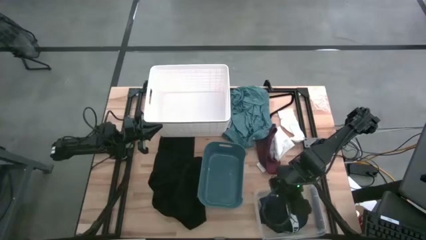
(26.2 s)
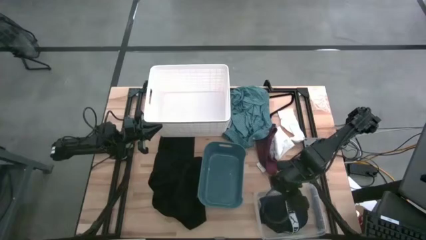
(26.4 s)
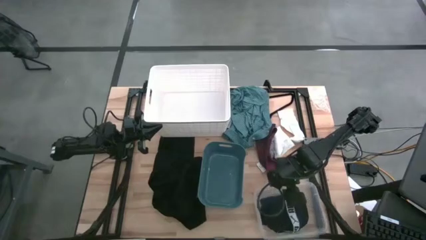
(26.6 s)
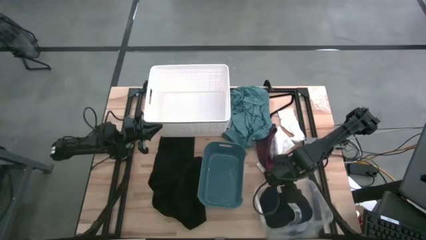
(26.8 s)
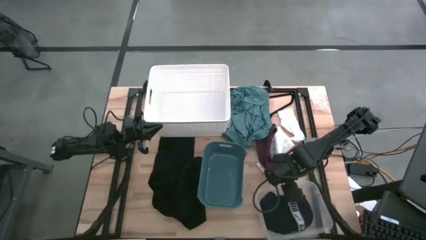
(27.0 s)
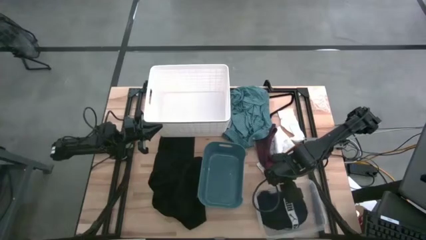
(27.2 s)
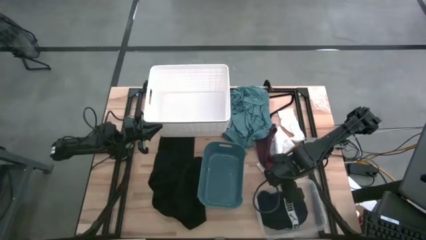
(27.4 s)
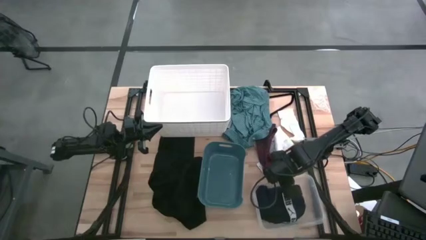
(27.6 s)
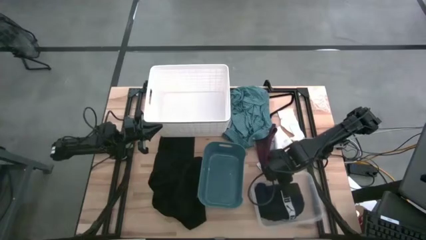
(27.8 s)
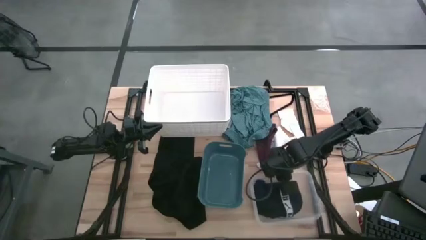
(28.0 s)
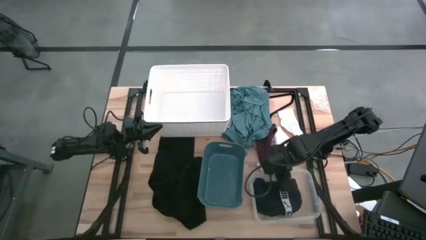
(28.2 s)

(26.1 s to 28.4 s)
Task: Pick & Place Cloths
Adjust the transparent bin

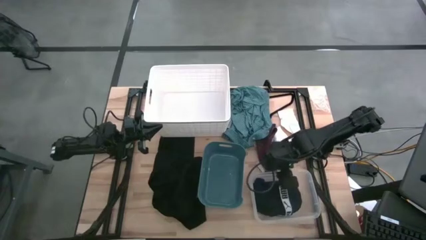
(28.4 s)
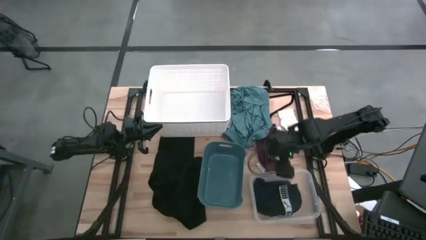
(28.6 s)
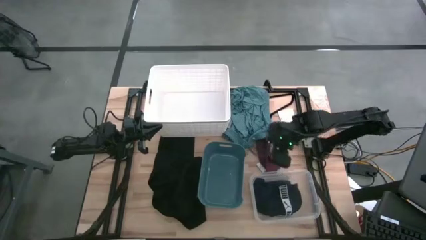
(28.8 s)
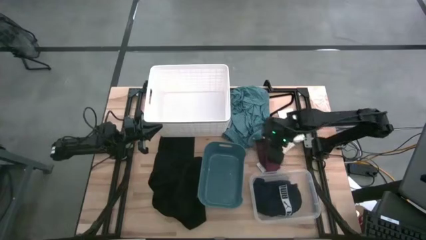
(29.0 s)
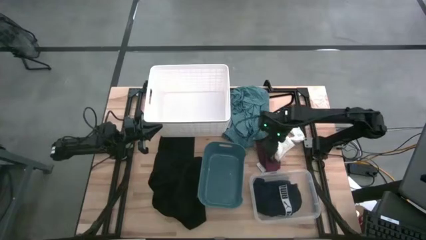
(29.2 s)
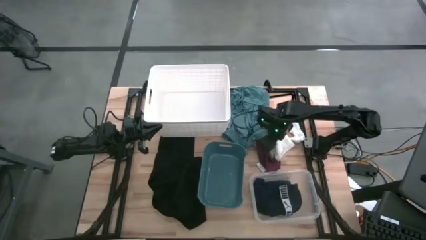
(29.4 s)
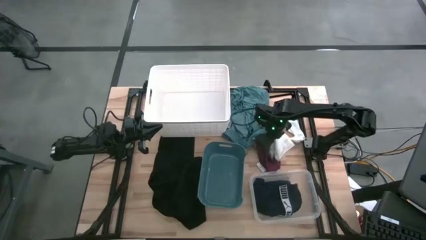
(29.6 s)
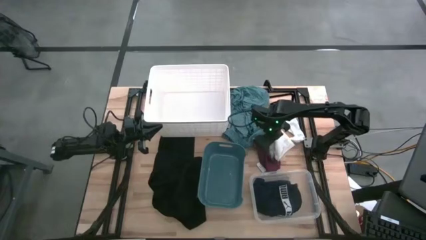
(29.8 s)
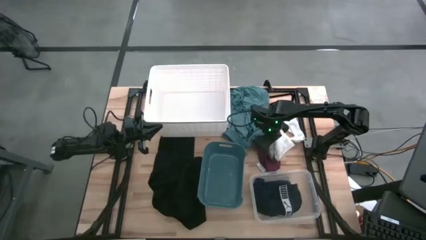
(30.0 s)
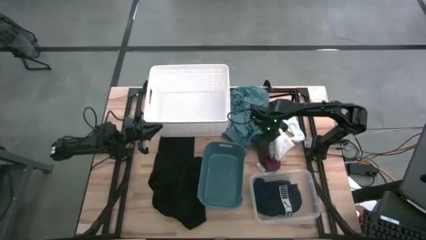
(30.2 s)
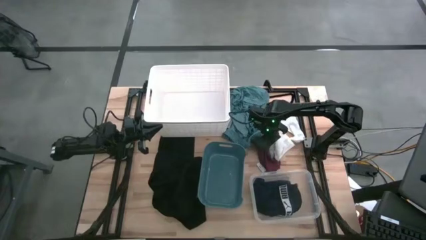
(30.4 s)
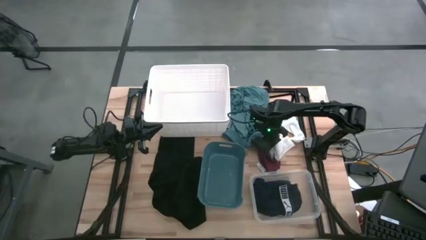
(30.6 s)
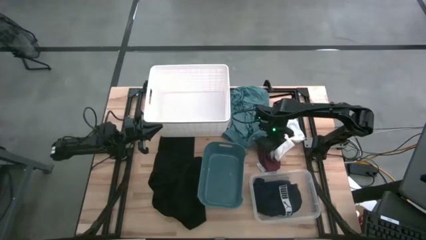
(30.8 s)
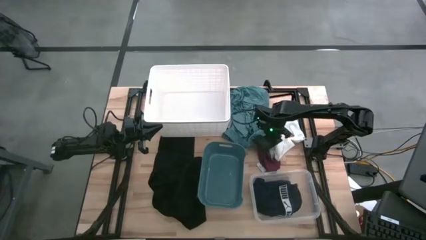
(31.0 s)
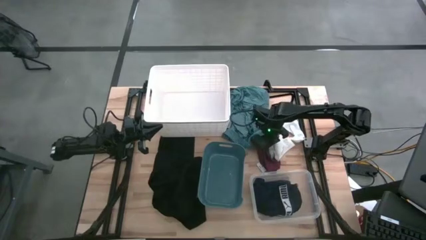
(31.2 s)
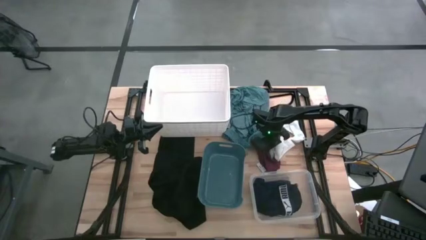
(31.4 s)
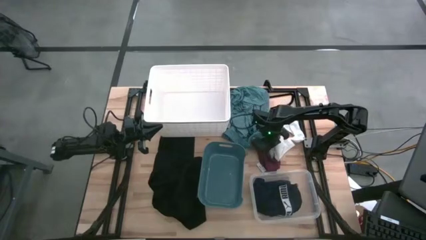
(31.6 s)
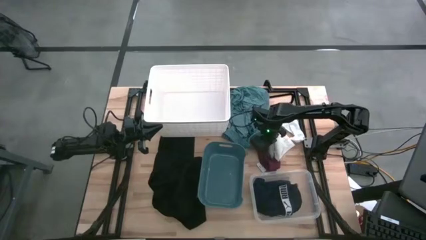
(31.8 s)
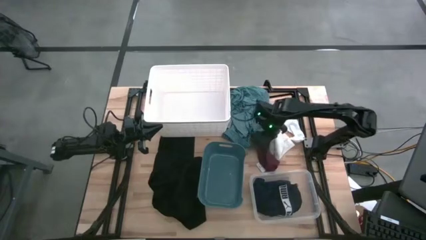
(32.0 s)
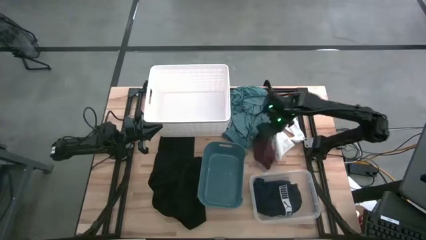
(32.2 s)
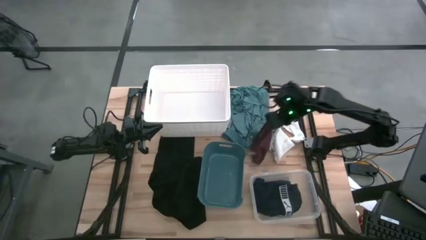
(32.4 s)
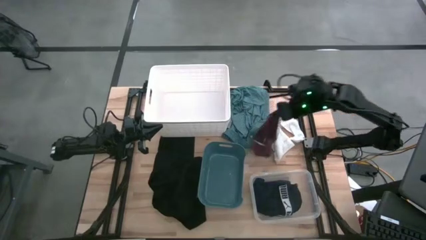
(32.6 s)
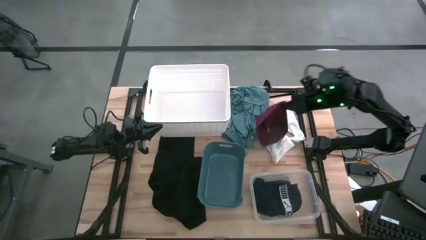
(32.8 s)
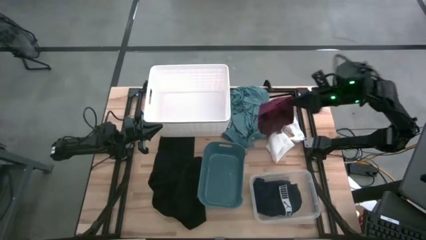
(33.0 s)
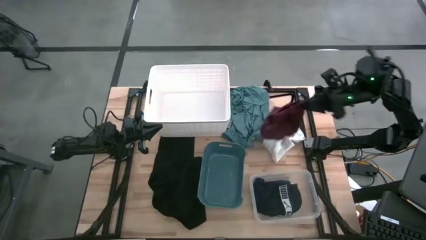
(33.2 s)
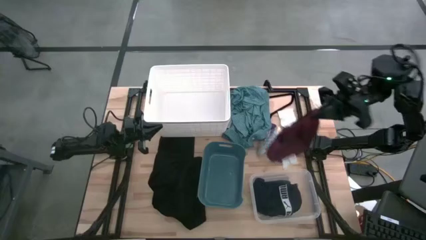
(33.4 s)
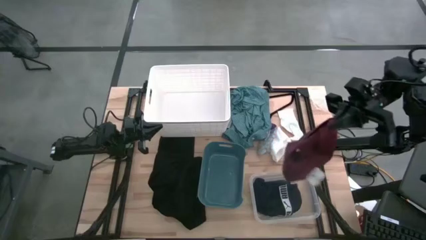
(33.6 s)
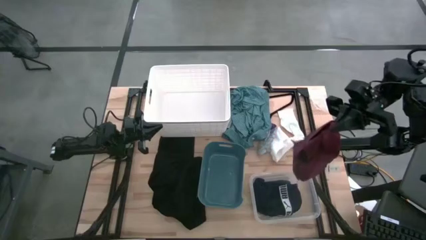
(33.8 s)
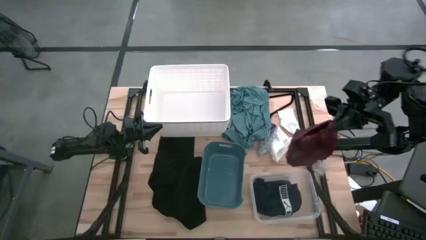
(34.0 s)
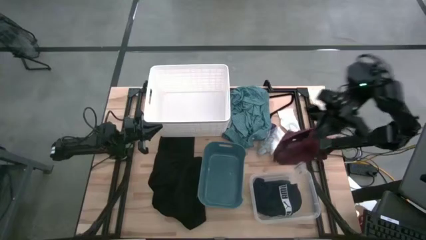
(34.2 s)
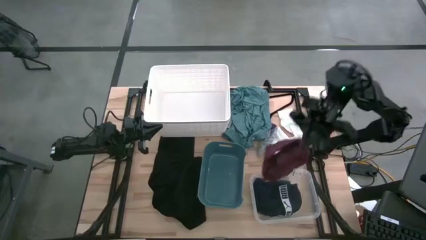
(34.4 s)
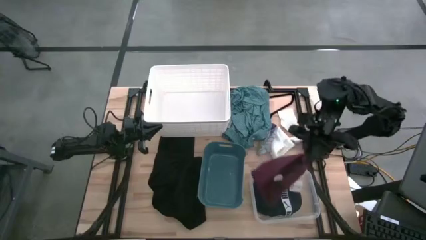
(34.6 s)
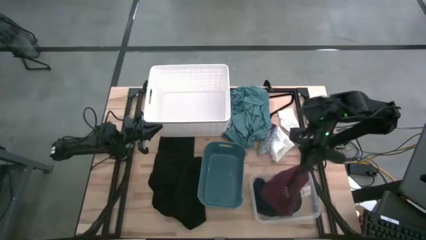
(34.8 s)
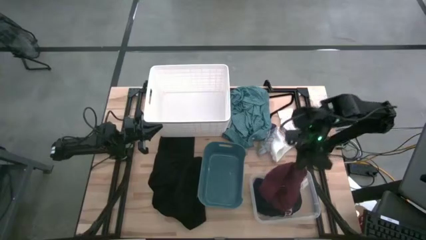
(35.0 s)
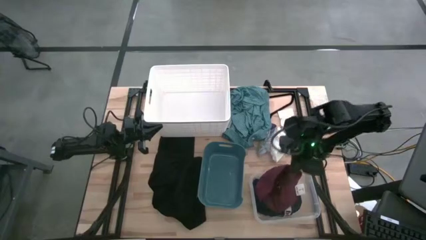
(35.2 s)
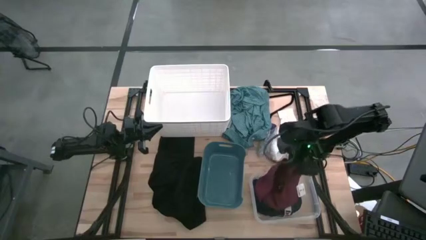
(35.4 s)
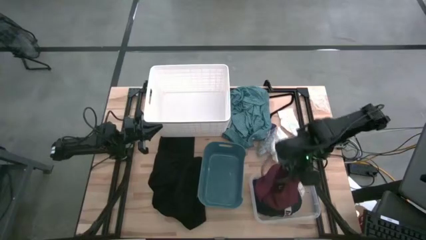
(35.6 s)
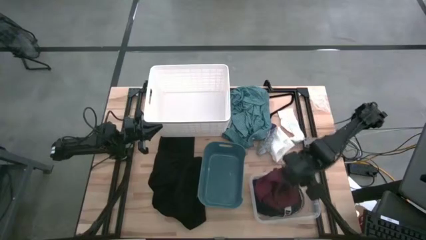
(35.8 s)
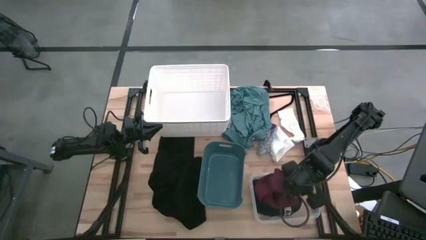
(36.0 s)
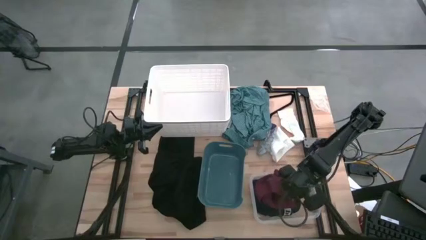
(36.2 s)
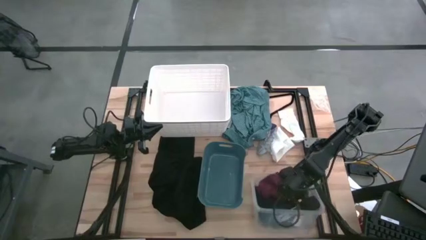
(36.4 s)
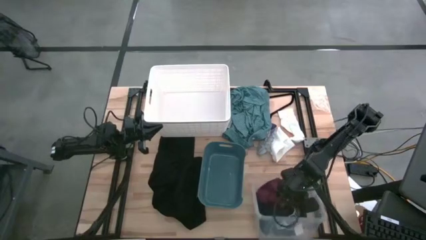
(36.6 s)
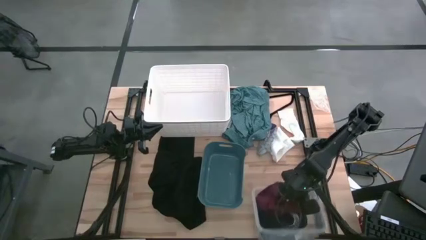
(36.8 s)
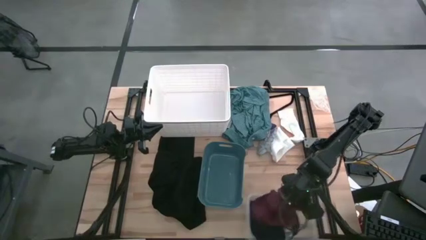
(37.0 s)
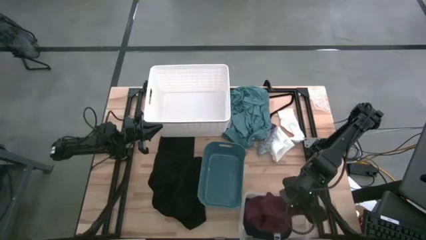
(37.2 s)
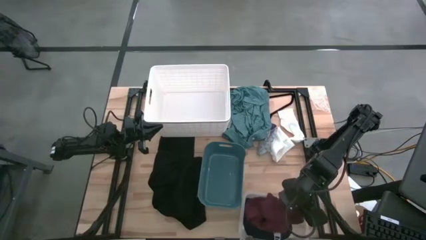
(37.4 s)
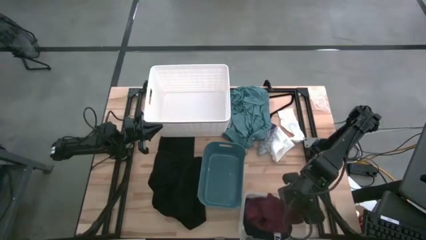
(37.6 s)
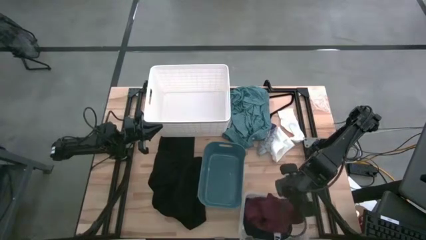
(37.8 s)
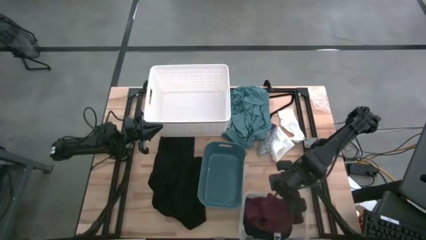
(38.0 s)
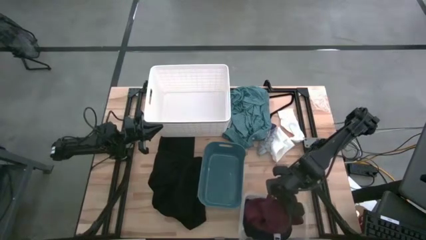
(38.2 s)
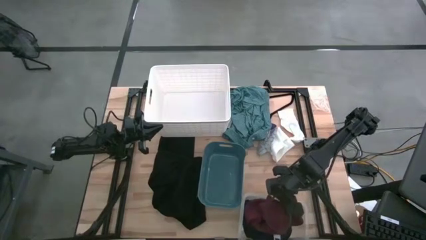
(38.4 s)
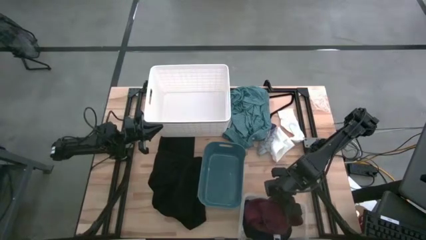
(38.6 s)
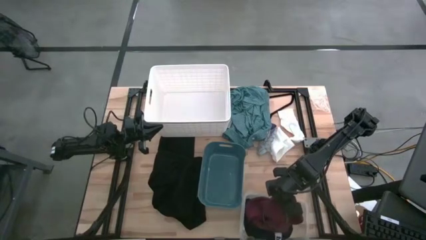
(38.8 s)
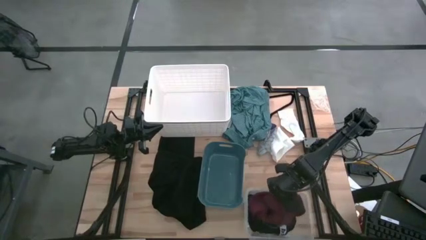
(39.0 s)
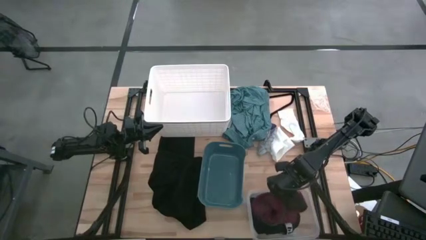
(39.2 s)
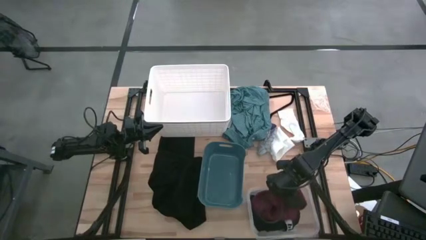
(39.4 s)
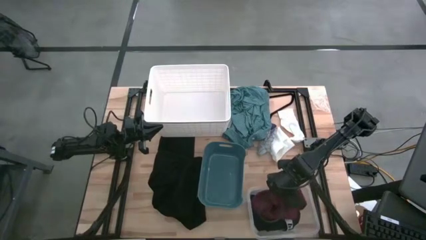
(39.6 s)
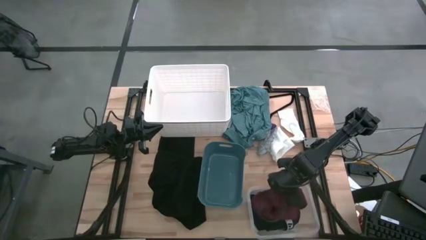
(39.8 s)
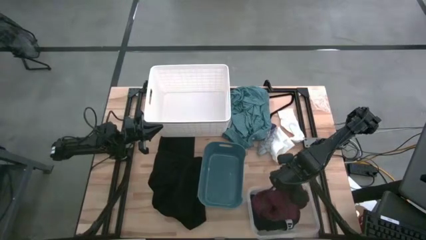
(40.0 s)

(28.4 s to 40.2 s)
Put the red underwear into the transparent bin
